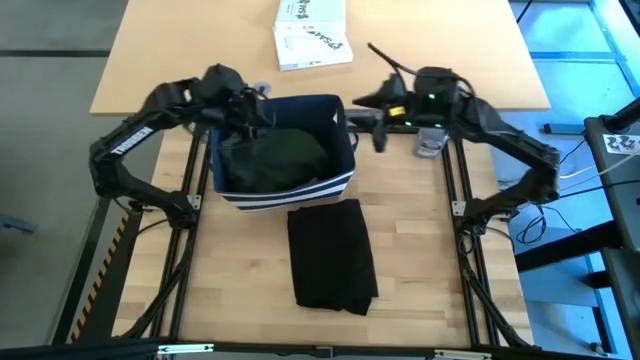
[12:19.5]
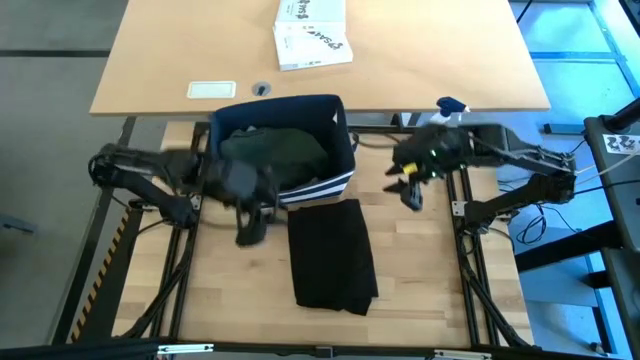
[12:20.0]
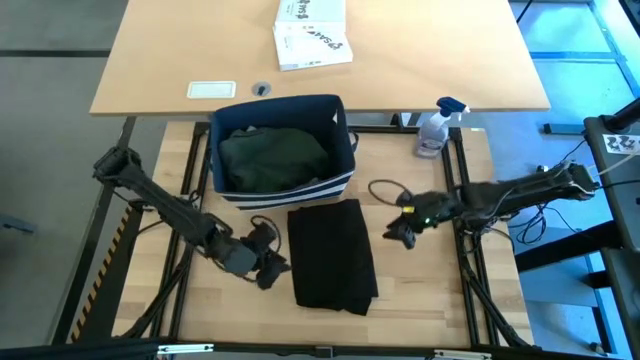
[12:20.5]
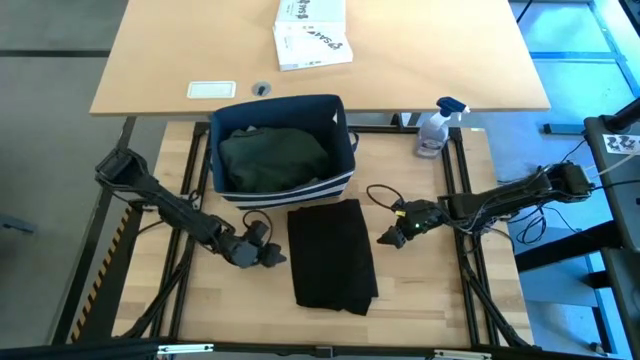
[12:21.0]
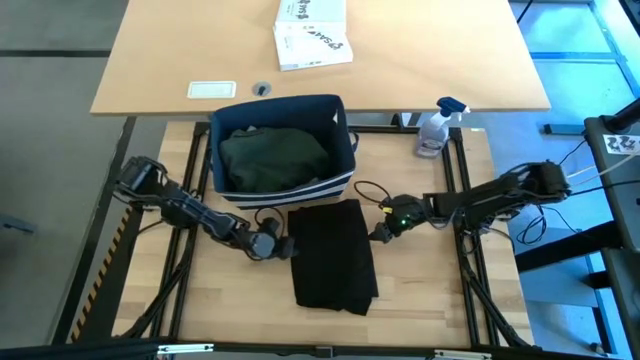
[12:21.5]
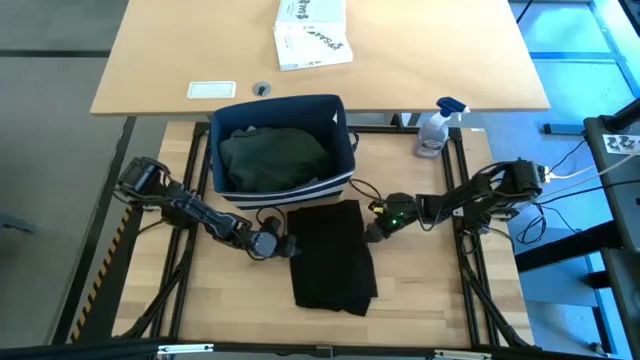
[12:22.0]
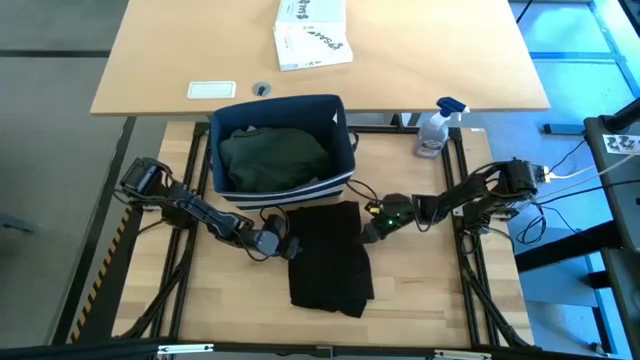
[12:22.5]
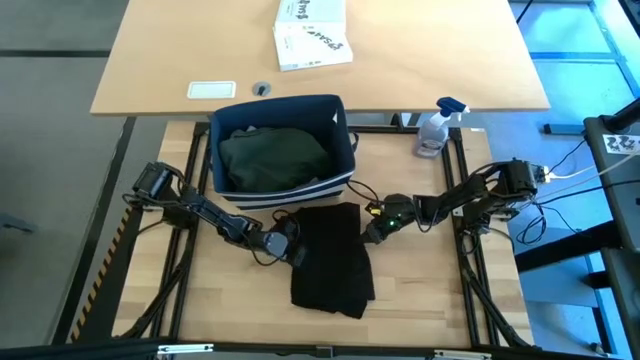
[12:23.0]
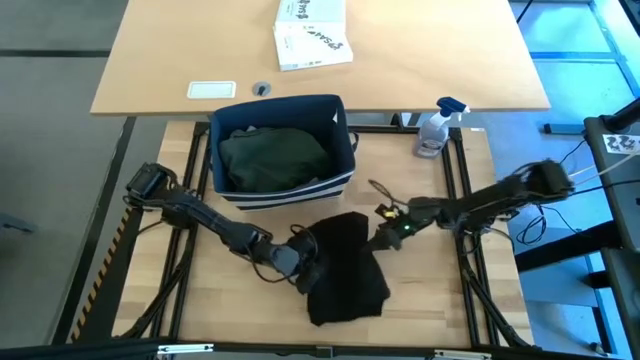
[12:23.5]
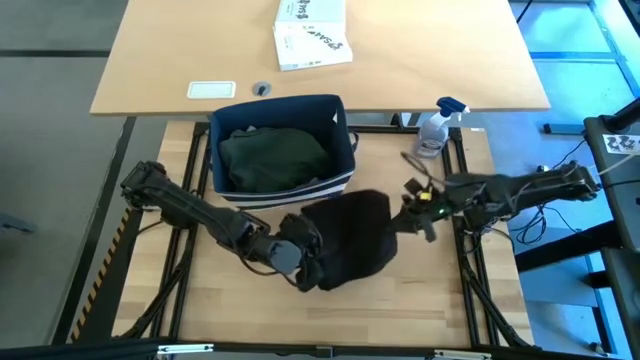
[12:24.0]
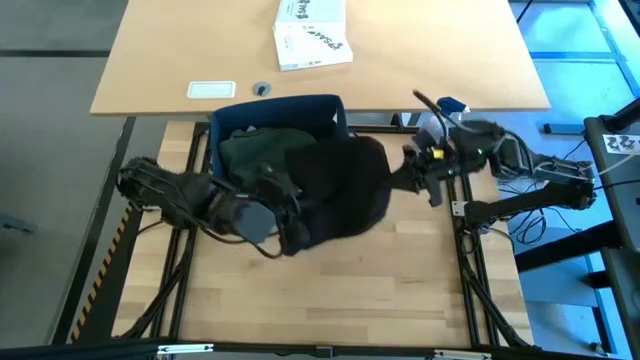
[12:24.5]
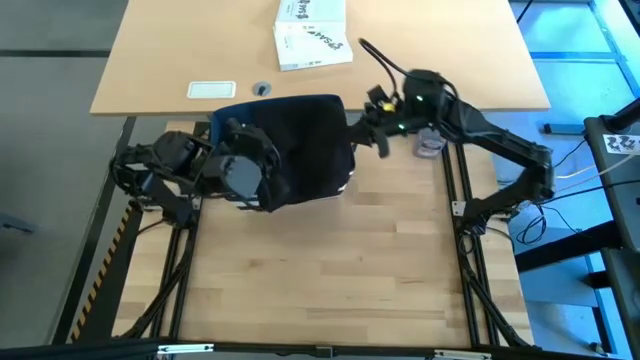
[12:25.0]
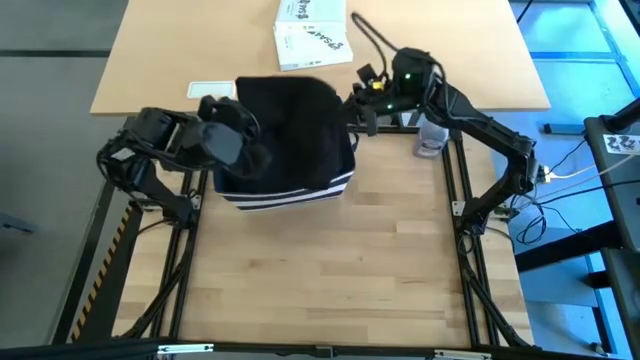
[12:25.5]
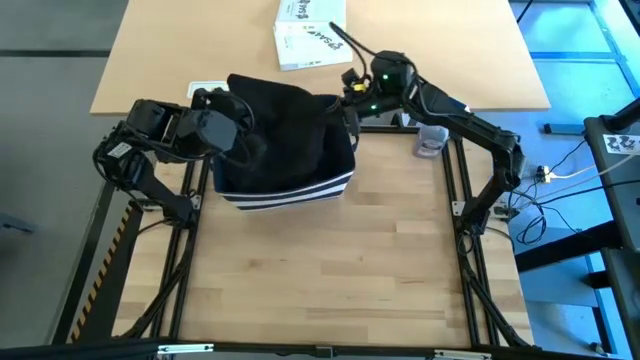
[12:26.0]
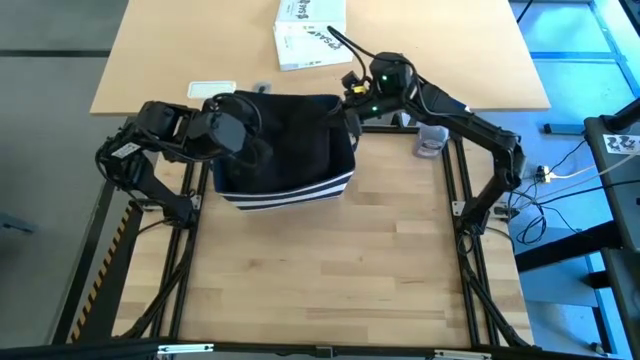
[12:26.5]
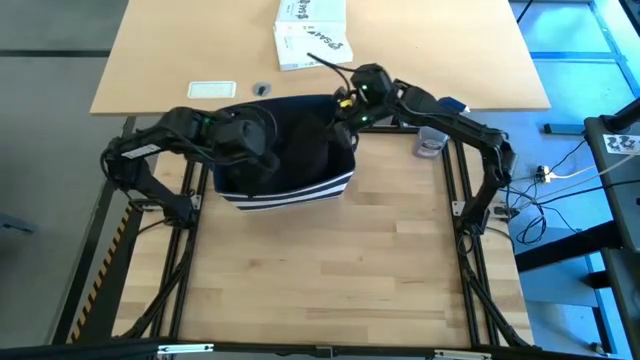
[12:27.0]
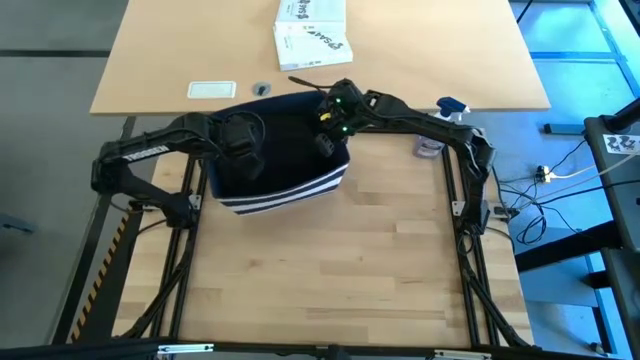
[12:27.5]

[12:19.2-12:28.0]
Task: Fold Laundry from Bin
Put the folded black shirt into the blue bin

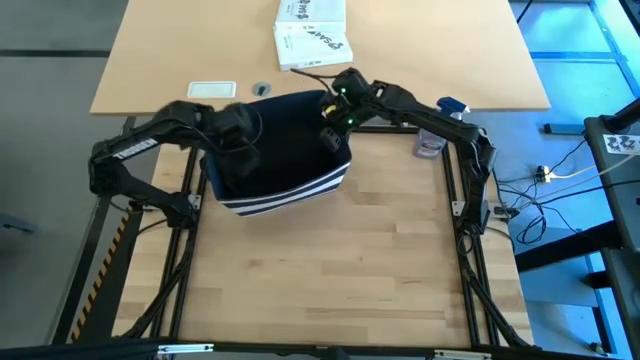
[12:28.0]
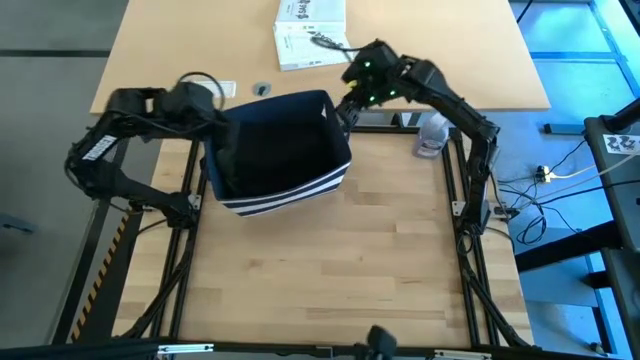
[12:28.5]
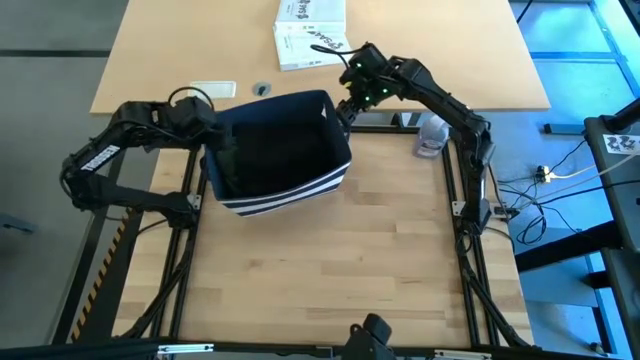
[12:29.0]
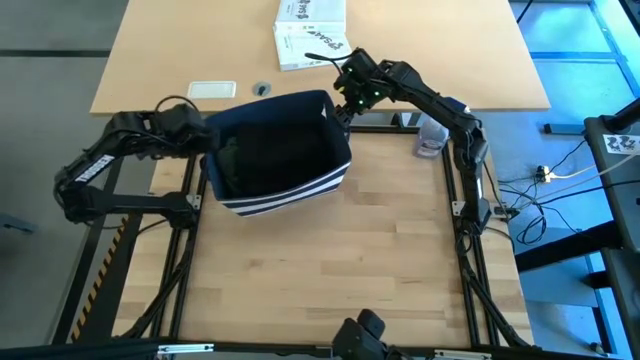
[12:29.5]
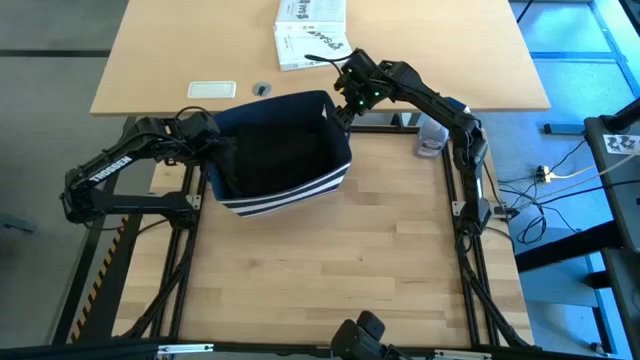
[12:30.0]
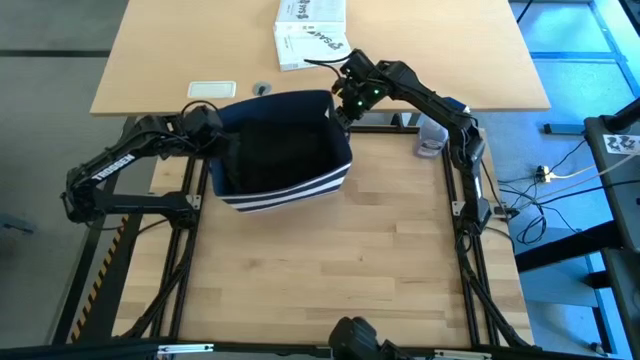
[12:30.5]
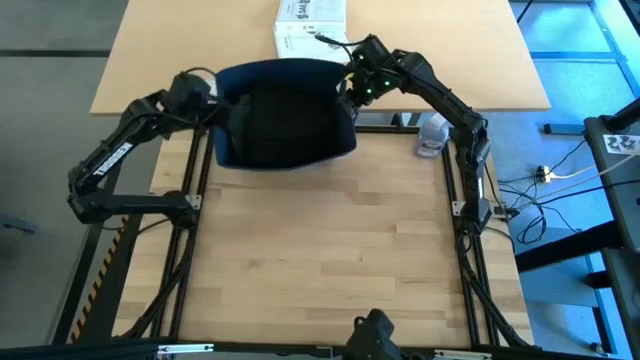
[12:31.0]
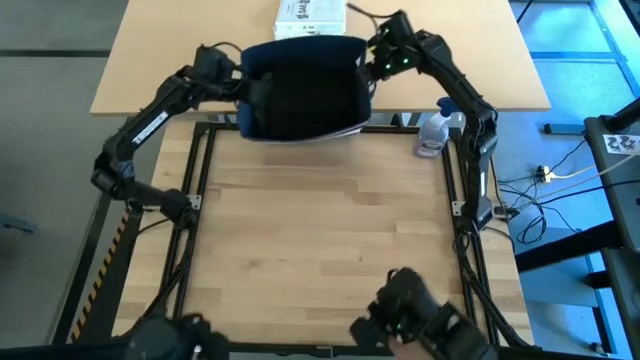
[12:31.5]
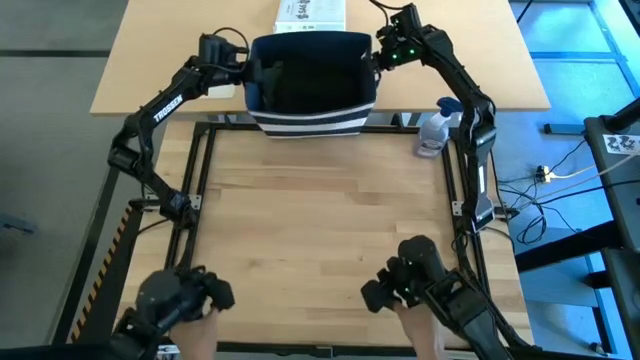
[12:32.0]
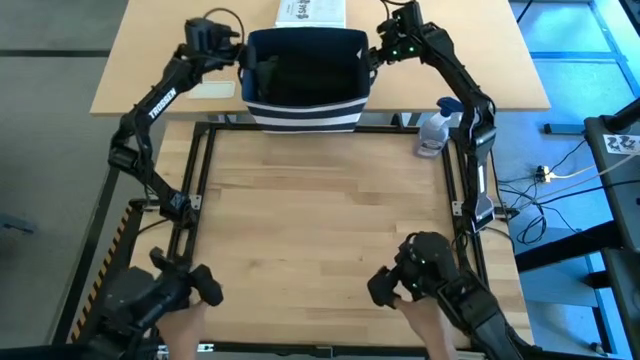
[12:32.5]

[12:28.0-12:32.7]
Move the blue bin to the other table

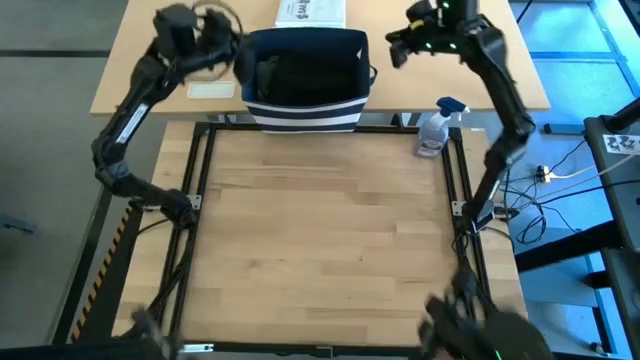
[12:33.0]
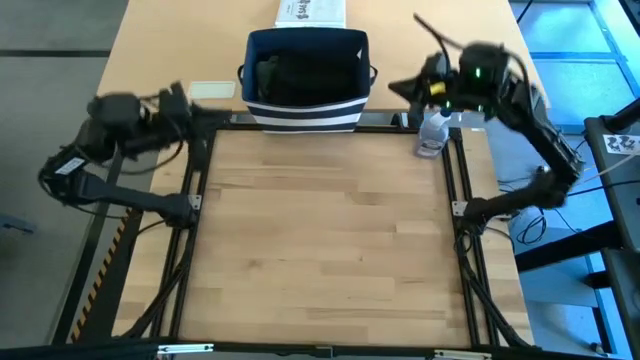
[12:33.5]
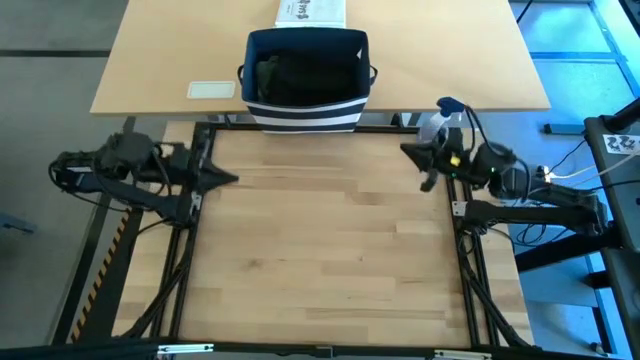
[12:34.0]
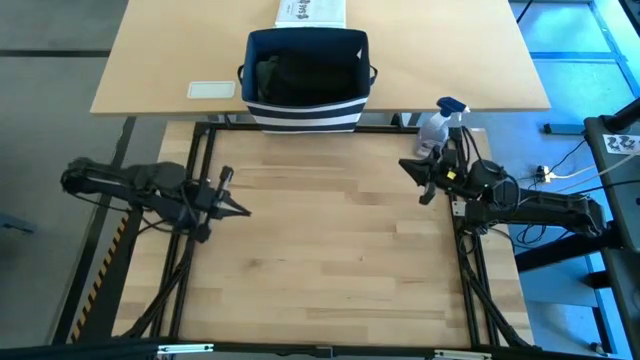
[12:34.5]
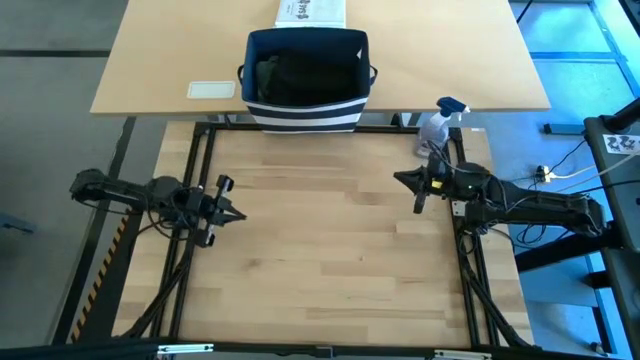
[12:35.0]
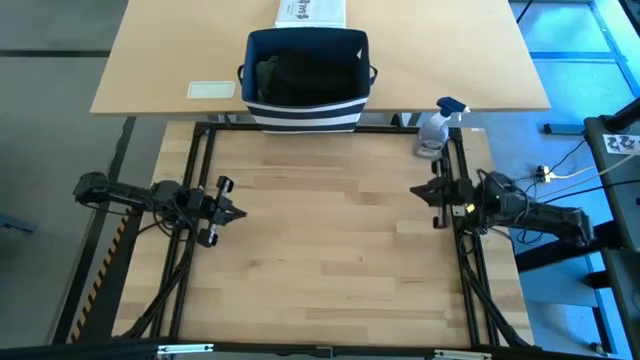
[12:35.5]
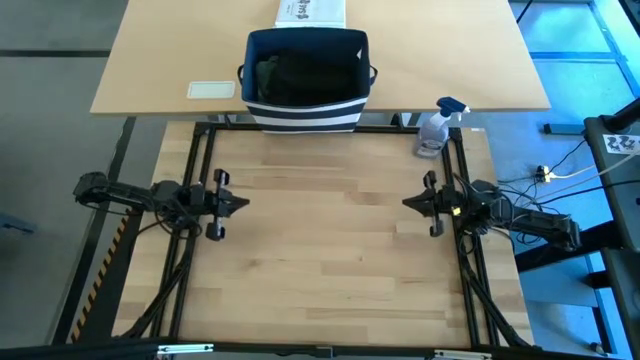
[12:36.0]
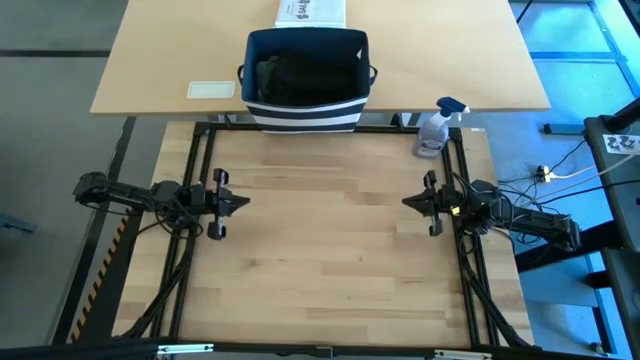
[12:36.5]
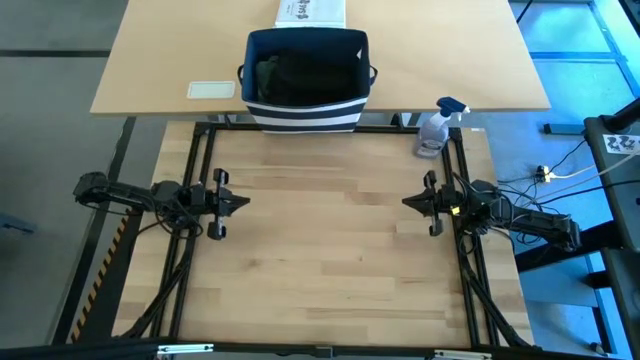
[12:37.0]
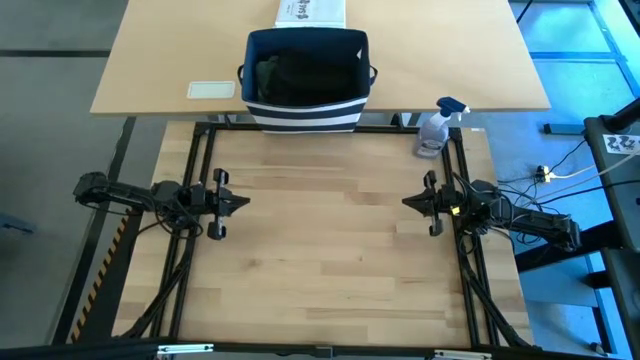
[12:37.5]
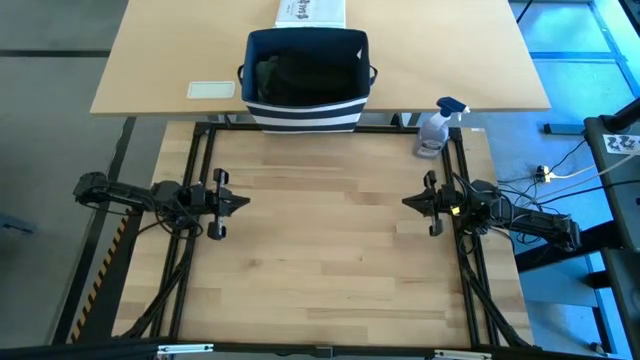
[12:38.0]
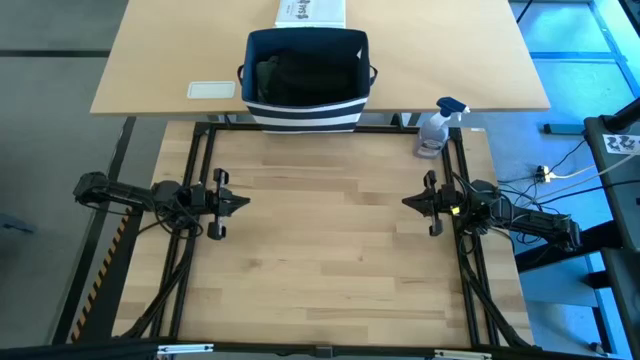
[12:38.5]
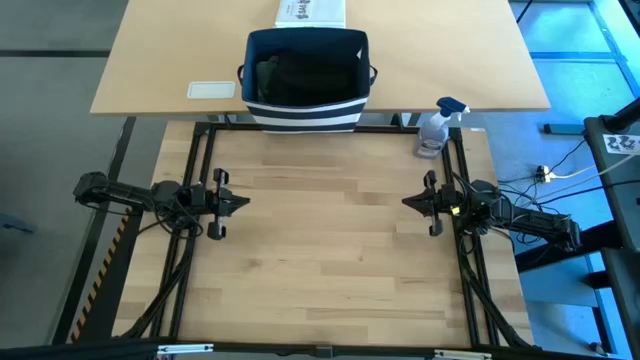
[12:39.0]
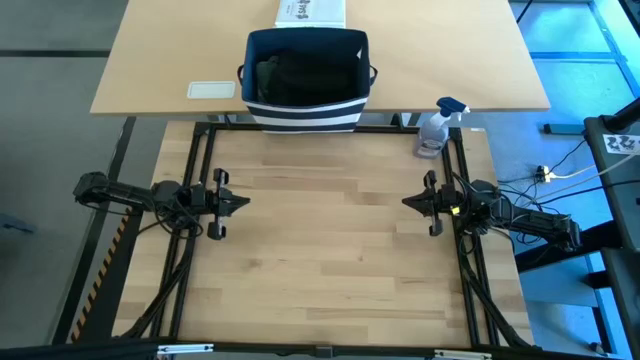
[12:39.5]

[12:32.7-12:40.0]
Return to Home Position
